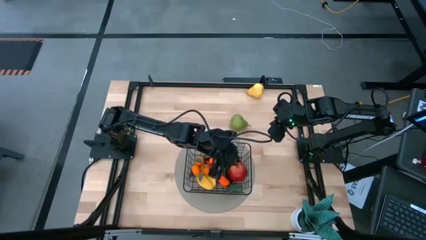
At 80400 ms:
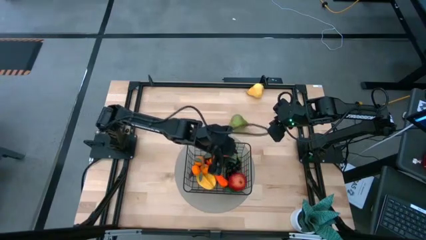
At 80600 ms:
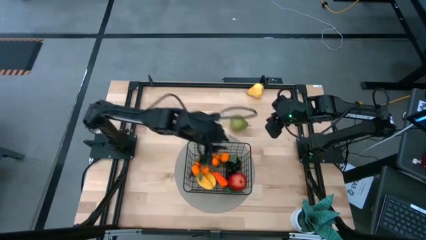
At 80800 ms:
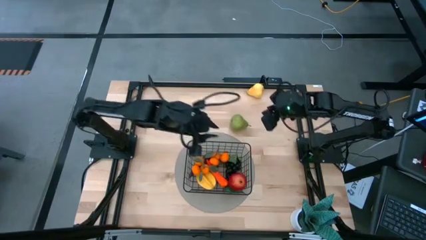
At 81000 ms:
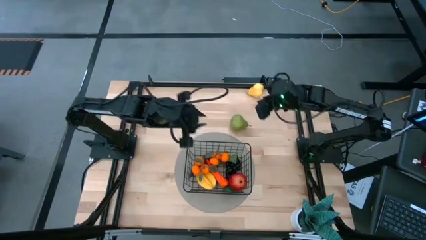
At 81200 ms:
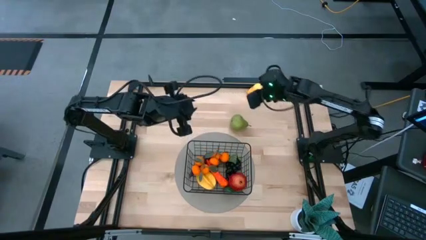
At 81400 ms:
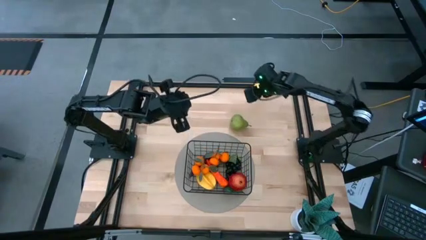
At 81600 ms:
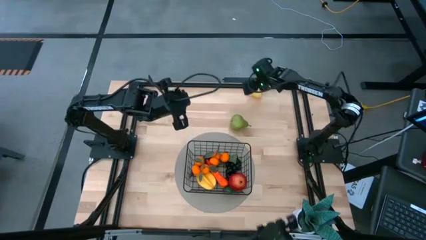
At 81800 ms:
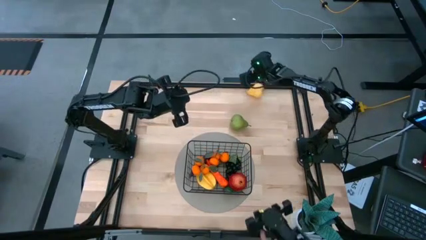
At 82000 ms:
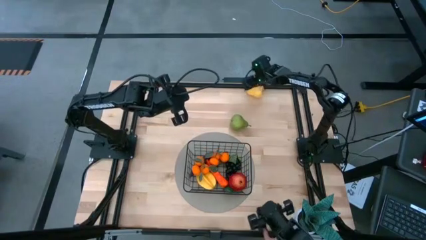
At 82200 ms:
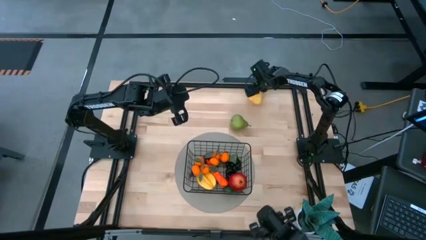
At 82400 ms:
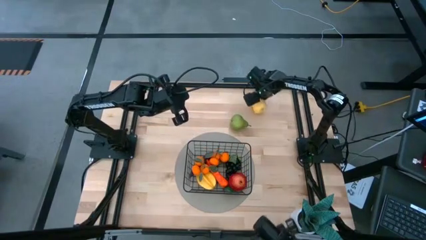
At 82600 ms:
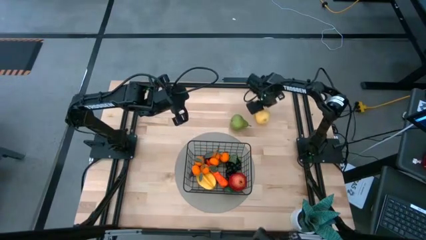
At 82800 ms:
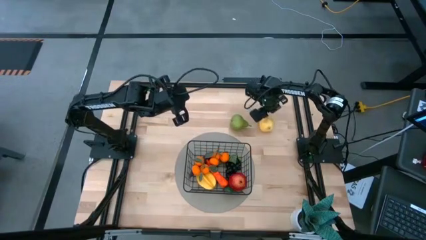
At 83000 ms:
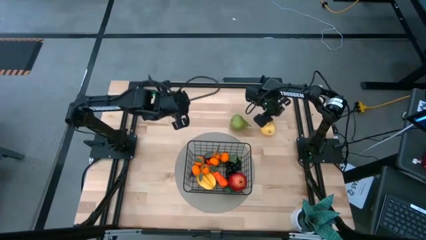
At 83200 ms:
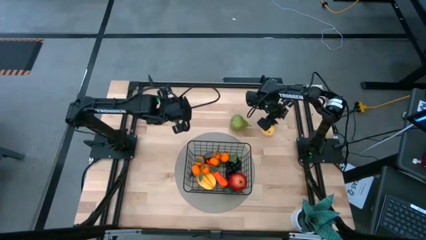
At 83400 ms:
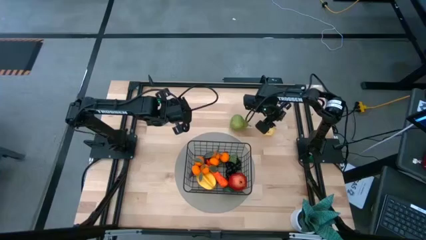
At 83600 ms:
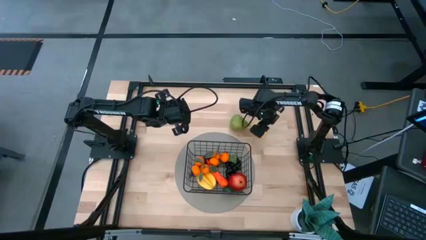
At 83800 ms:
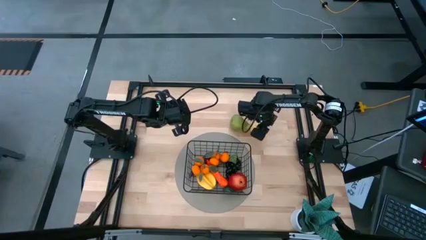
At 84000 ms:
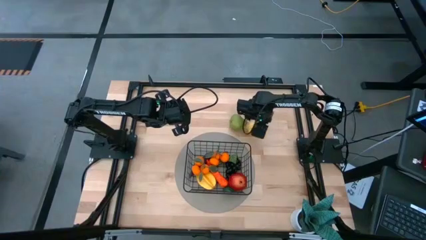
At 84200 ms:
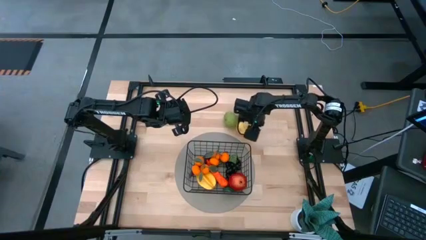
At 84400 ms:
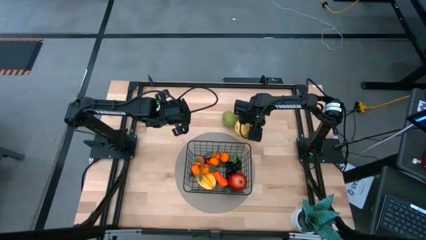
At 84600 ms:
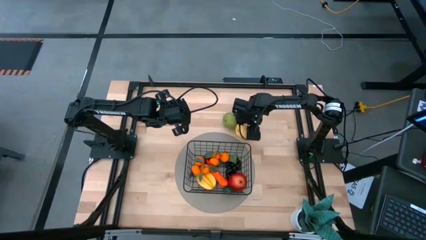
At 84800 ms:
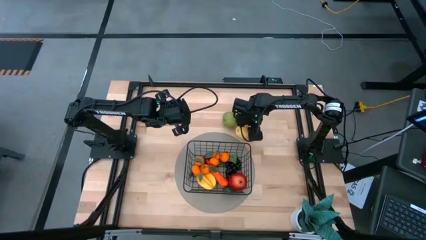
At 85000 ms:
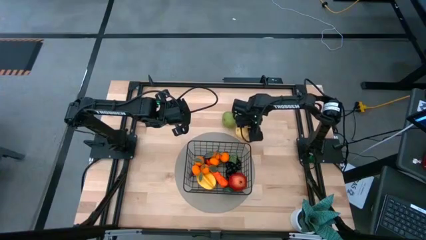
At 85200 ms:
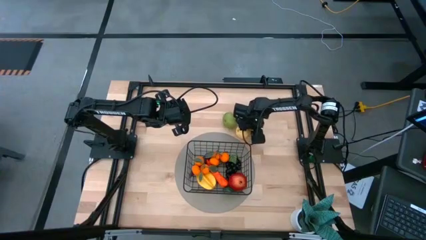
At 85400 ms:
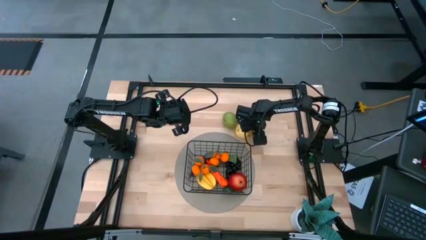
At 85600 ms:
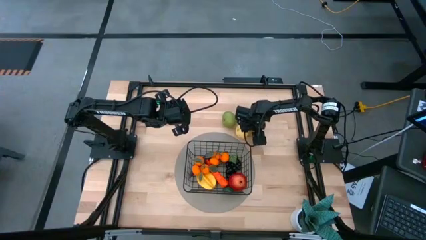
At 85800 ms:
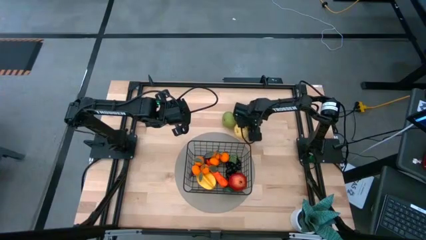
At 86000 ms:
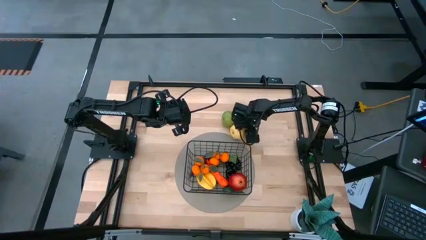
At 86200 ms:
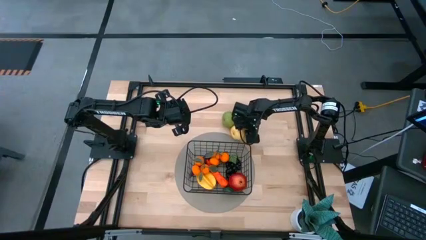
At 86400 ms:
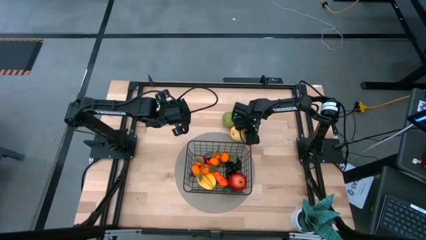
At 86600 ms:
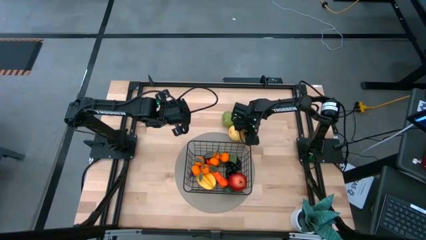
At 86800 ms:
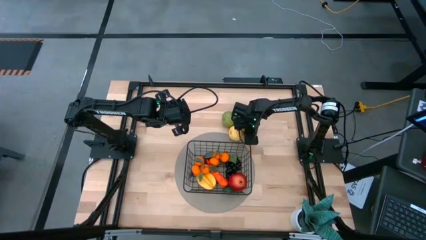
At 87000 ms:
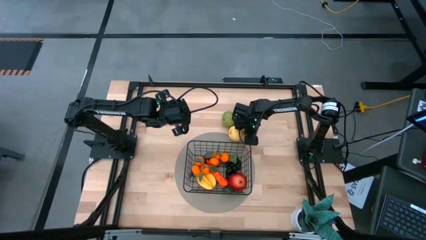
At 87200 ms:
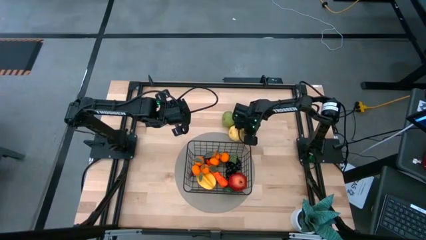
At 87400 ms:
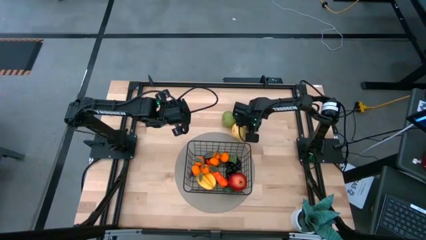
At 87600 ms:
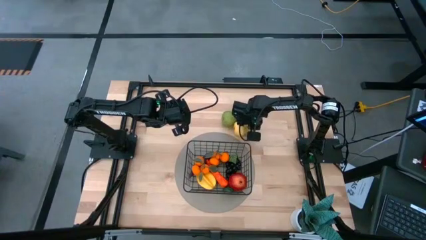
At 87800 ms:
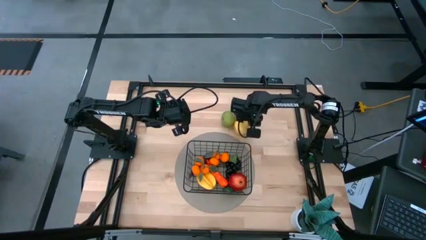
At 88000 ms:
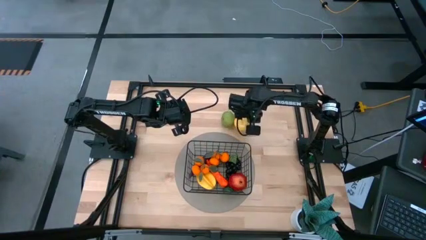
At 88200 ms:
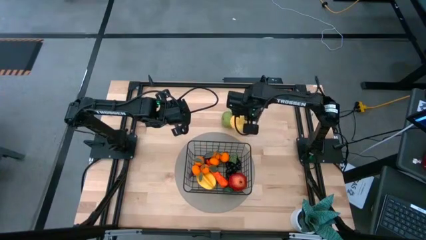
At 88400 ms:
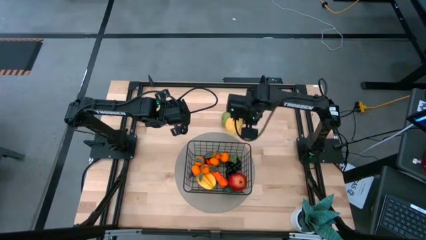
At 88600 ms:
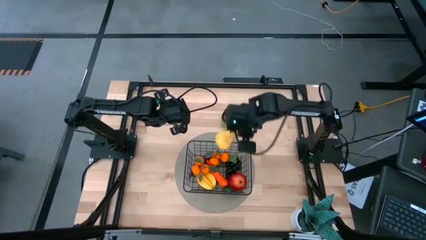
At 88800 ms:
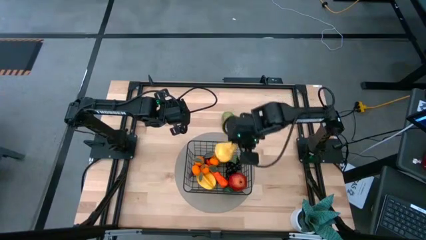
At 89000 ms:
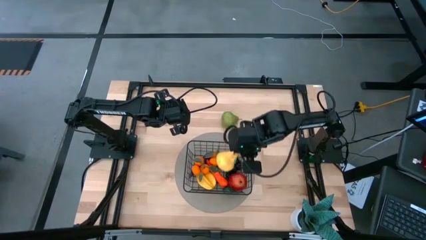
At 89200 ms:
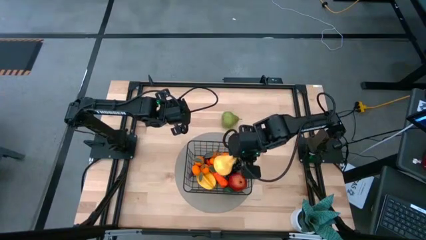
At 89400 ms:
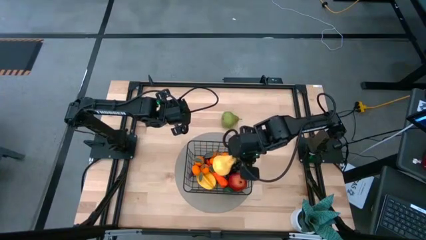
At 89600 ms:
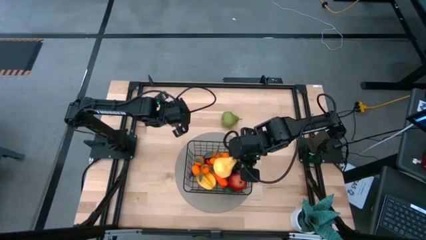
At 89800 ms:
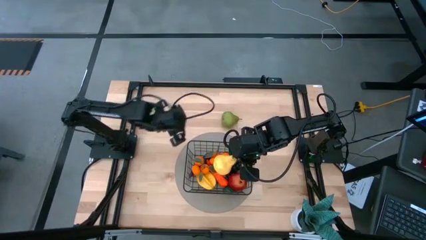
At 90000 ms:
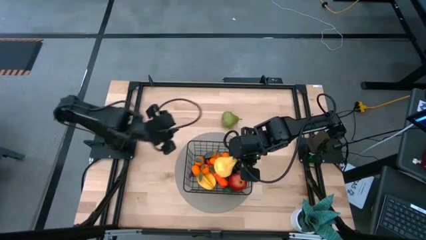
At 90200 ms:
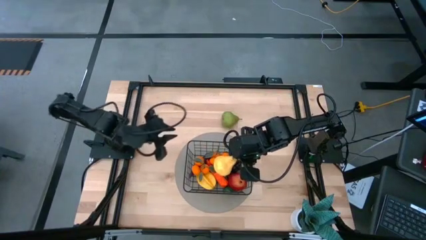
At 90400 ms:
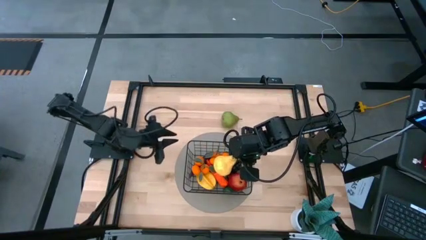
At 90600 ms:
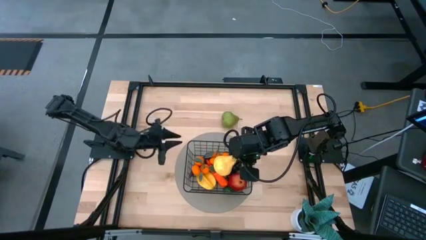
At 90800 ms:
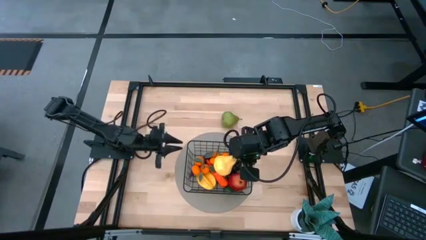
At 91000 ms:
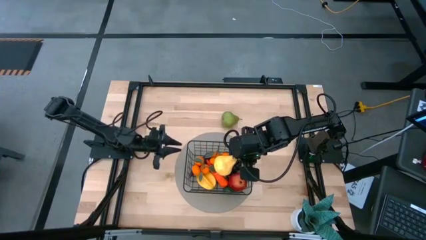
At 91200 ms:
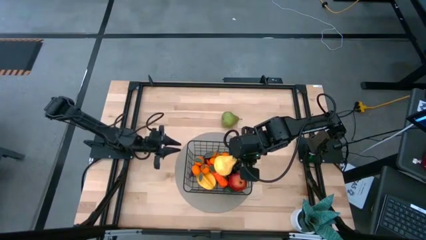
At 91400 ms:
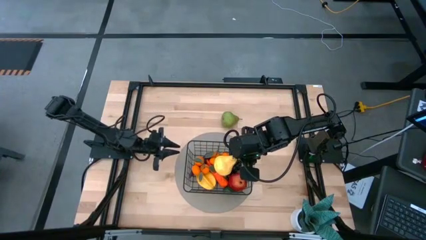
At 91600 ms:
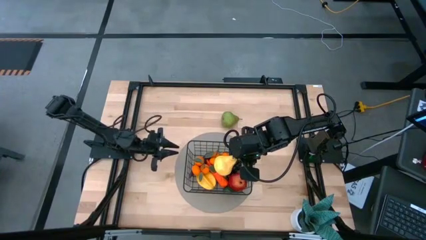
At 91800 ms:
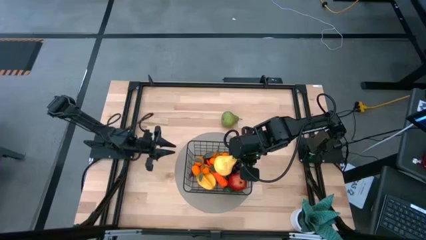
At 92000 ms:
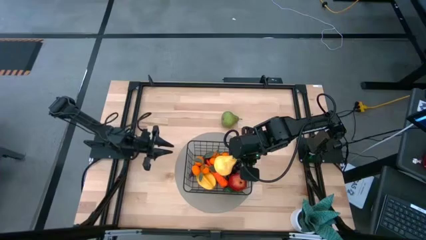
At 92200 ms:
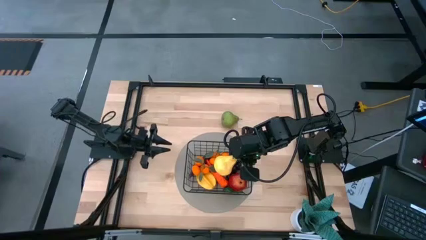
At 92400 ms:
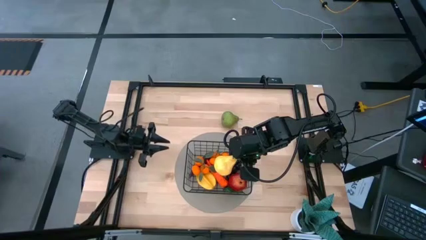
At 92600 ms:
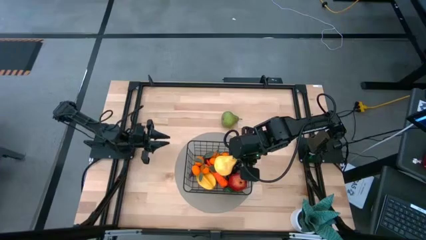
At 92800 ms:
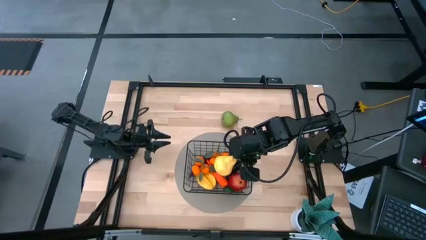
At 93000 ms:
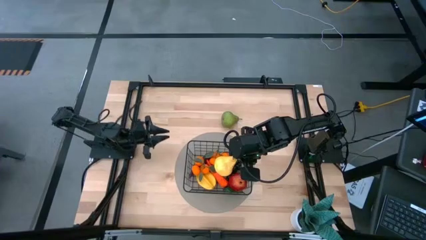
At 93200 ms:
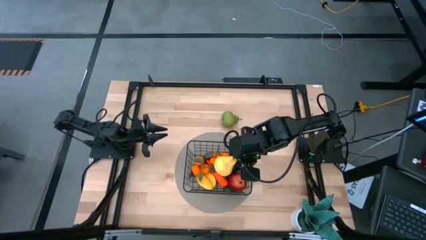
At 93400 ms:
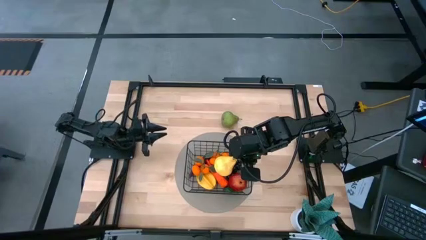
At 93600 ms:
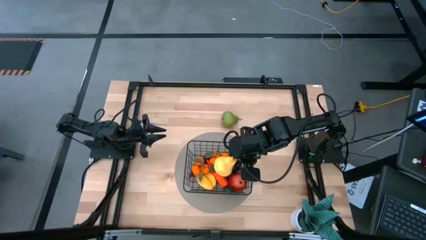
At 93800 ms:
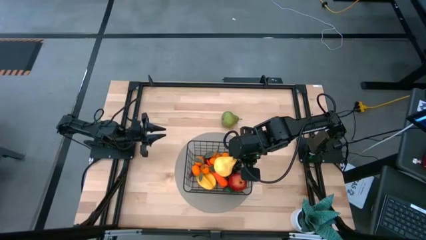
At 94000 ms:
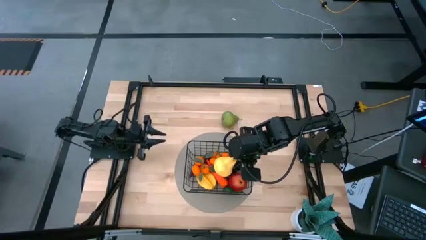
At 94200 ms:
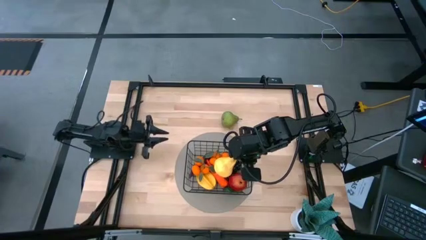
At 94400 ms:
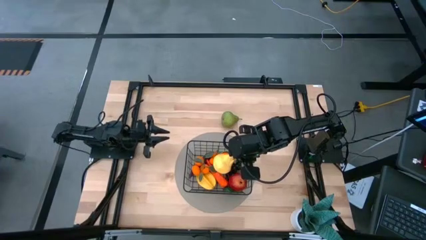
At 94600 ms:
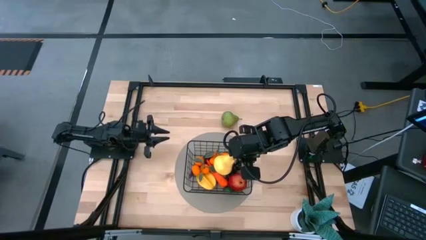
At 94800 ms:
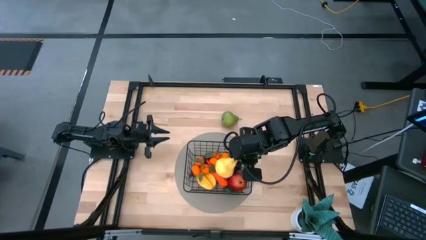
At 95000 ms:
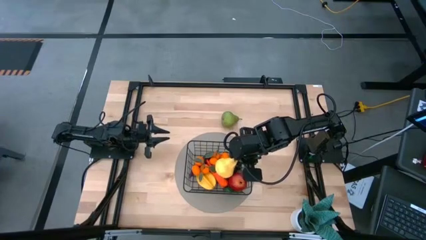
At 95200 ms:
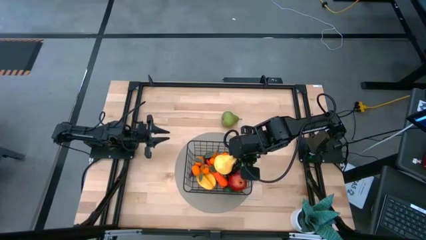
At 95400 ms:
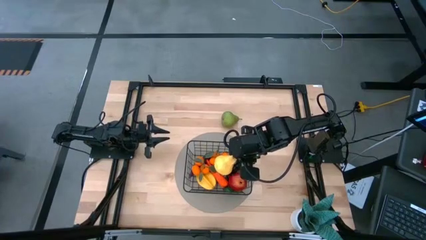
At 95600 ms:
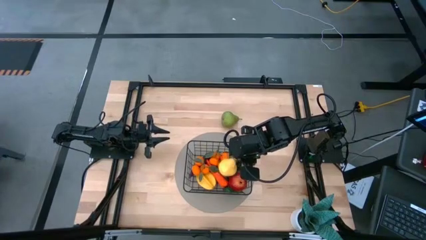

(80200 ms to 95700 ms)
Task: Build produce basket
Put the yellow pear into the wire basket
